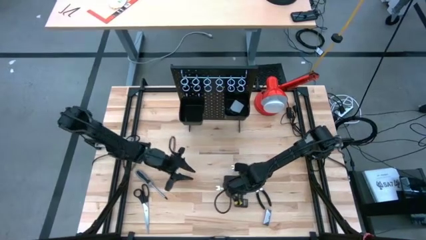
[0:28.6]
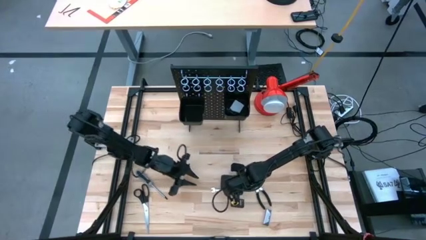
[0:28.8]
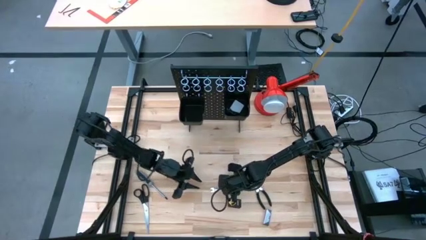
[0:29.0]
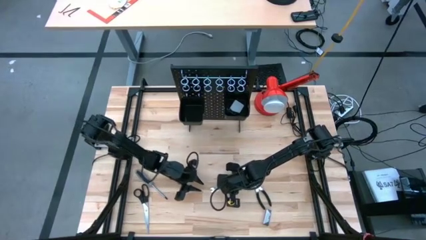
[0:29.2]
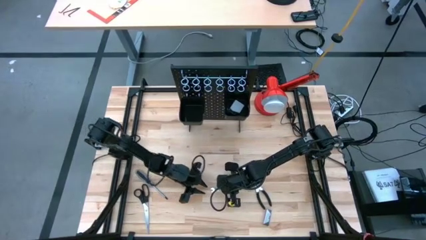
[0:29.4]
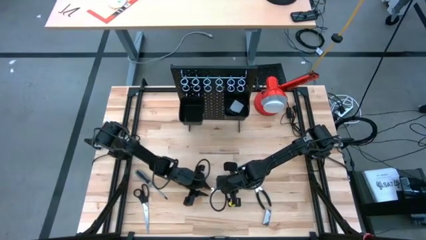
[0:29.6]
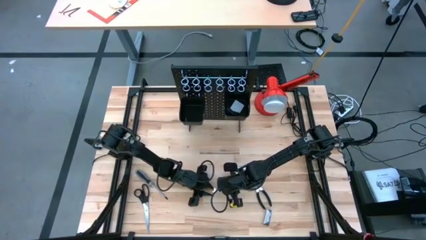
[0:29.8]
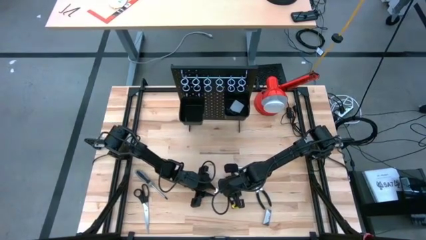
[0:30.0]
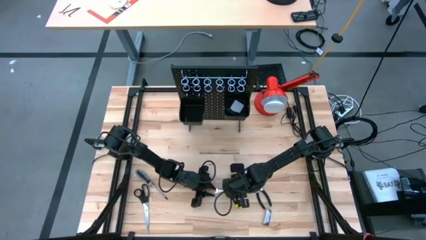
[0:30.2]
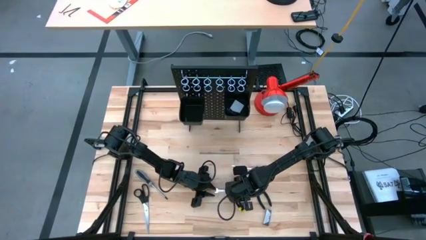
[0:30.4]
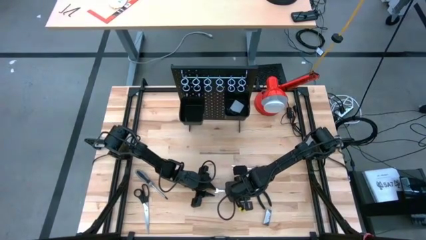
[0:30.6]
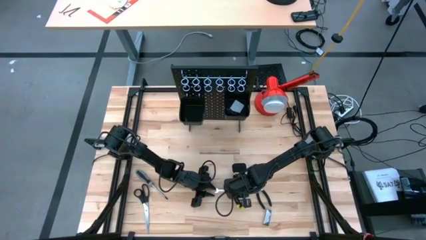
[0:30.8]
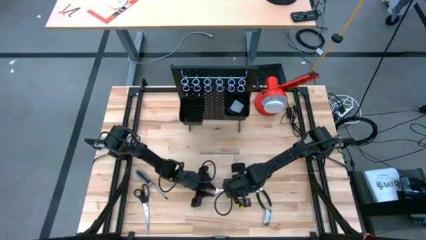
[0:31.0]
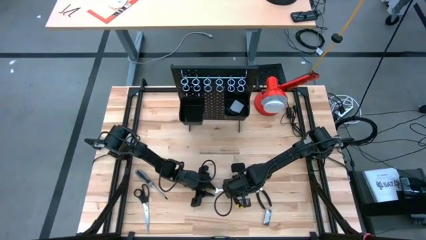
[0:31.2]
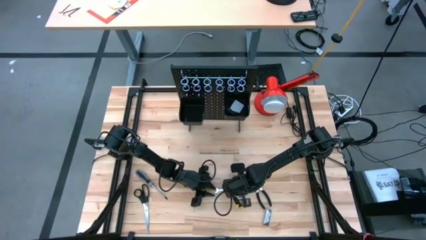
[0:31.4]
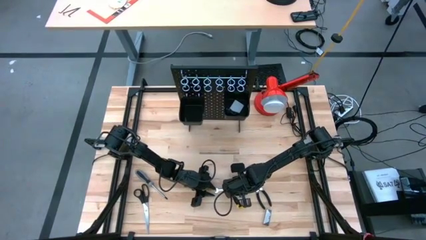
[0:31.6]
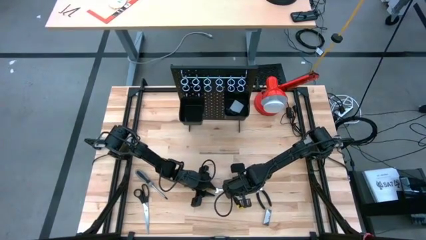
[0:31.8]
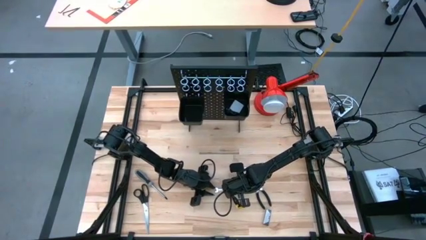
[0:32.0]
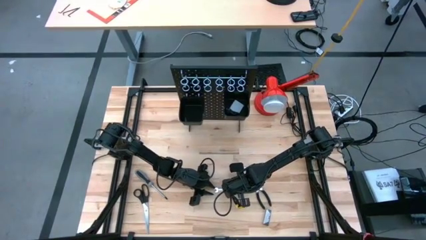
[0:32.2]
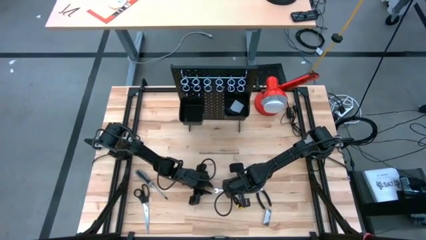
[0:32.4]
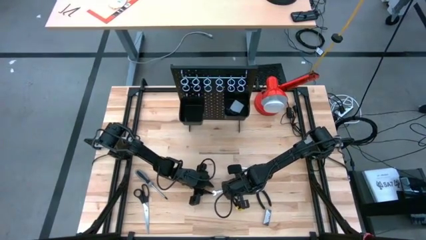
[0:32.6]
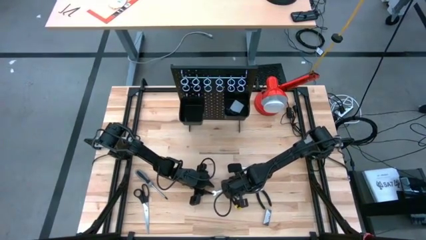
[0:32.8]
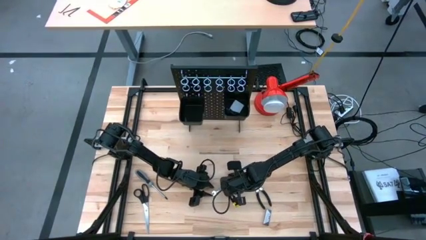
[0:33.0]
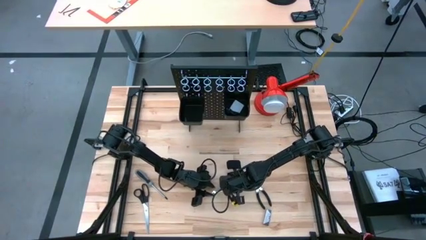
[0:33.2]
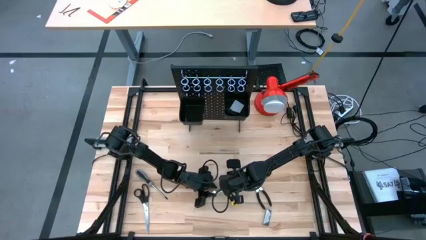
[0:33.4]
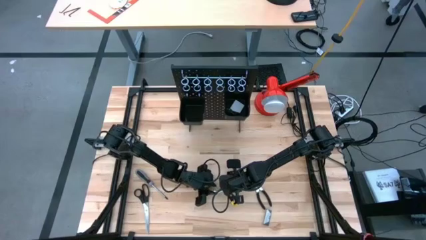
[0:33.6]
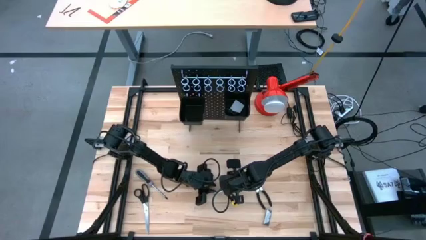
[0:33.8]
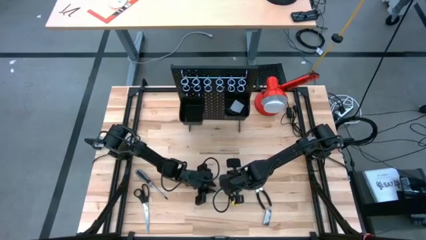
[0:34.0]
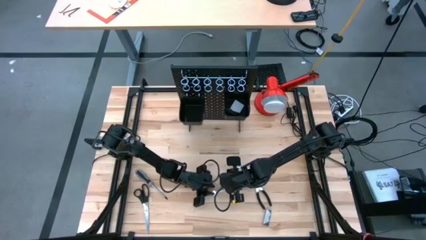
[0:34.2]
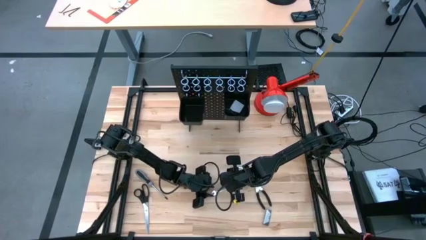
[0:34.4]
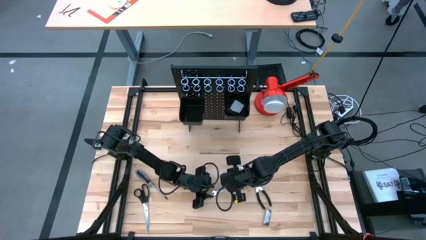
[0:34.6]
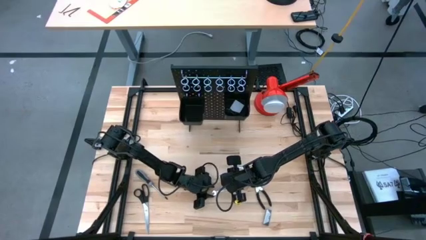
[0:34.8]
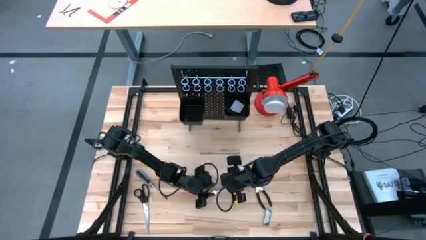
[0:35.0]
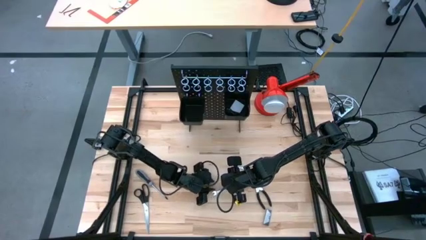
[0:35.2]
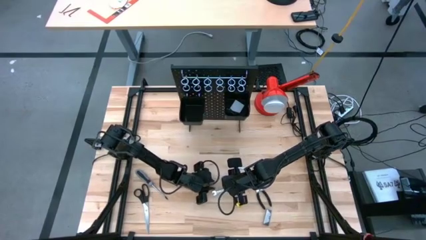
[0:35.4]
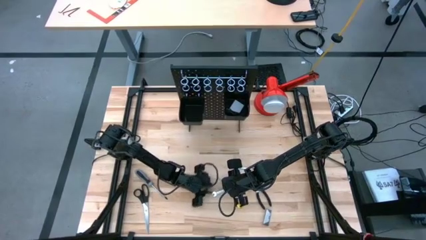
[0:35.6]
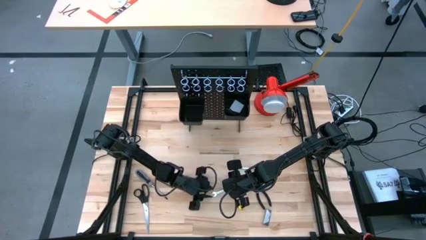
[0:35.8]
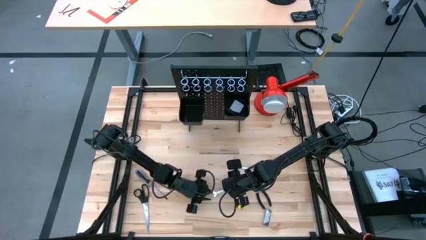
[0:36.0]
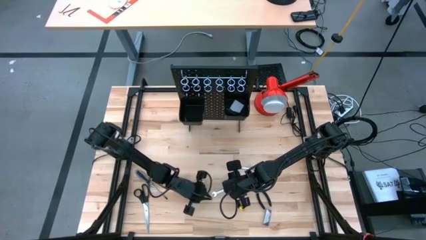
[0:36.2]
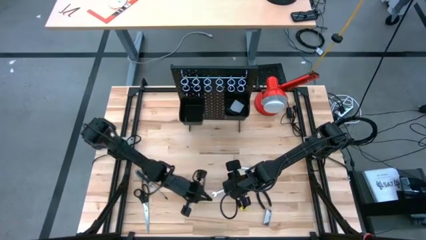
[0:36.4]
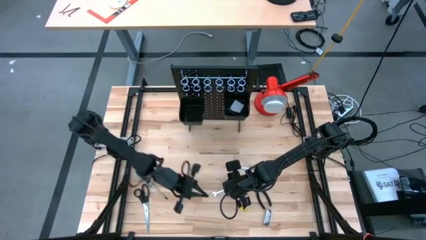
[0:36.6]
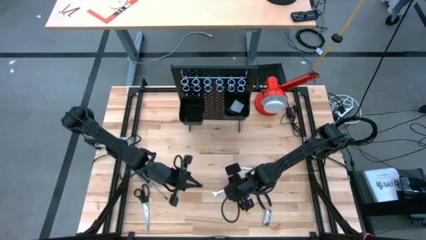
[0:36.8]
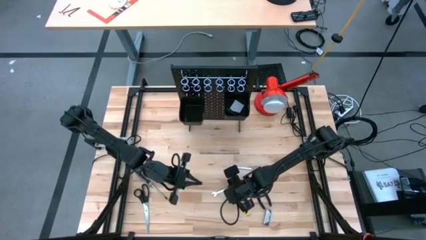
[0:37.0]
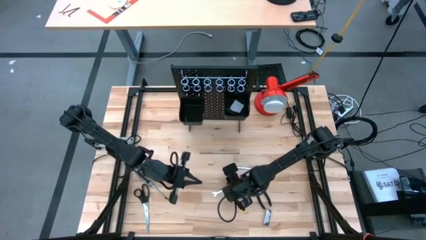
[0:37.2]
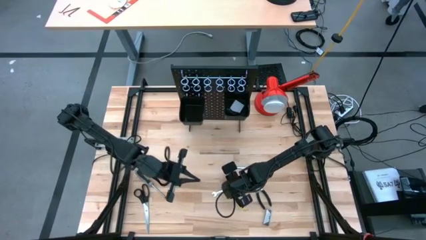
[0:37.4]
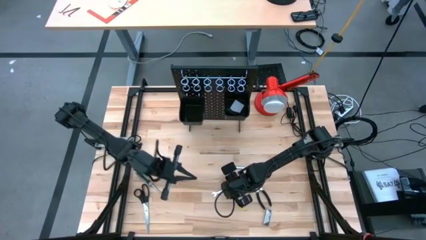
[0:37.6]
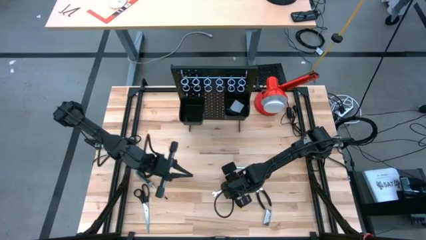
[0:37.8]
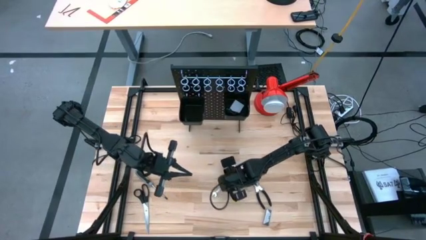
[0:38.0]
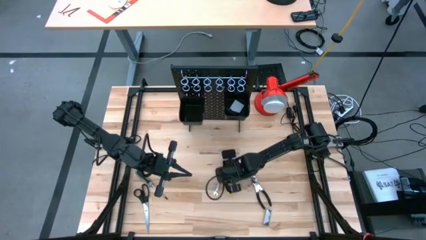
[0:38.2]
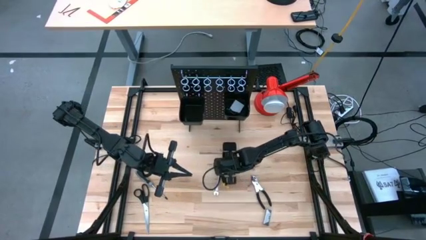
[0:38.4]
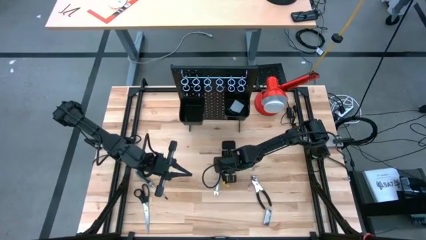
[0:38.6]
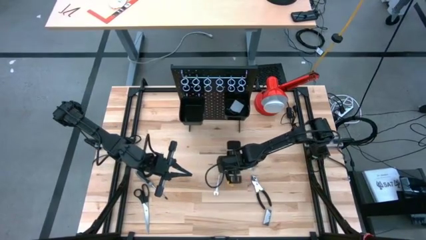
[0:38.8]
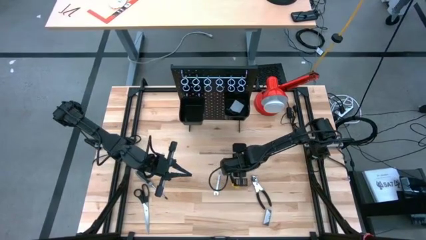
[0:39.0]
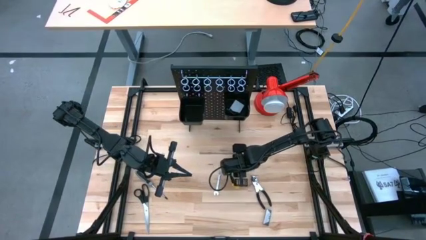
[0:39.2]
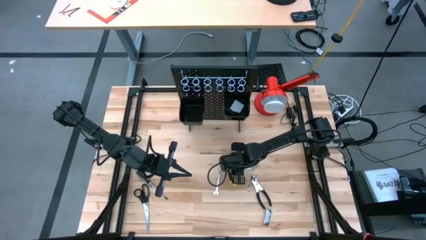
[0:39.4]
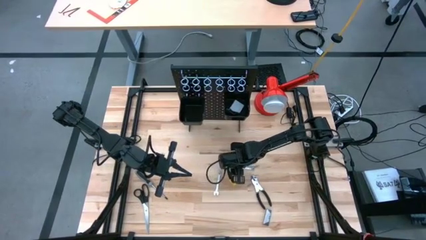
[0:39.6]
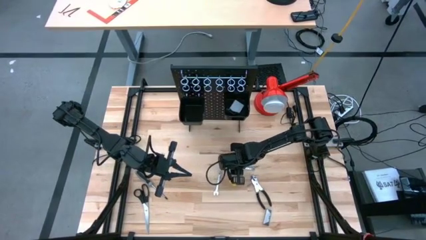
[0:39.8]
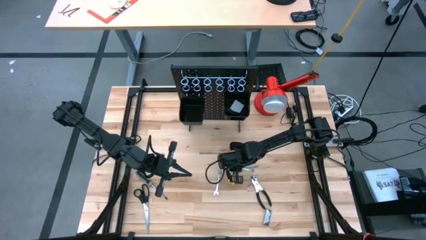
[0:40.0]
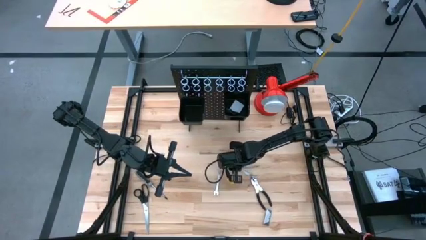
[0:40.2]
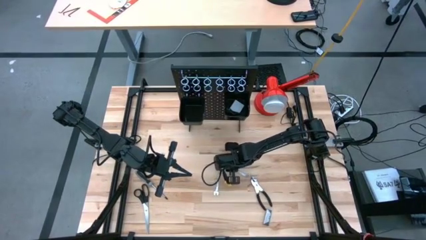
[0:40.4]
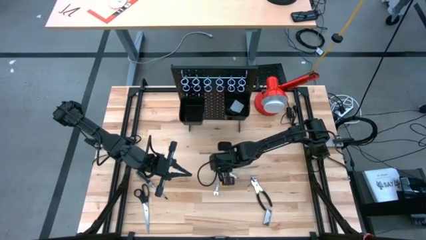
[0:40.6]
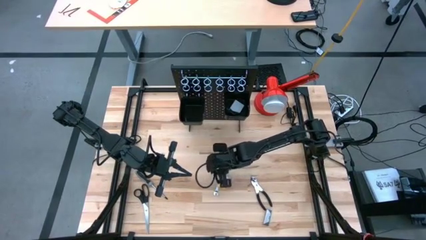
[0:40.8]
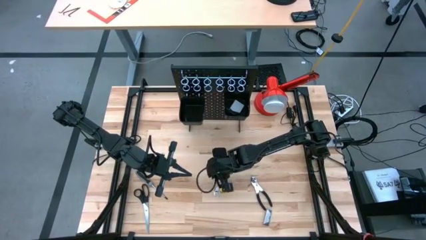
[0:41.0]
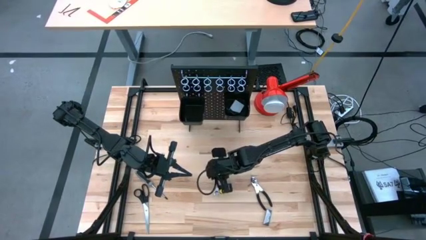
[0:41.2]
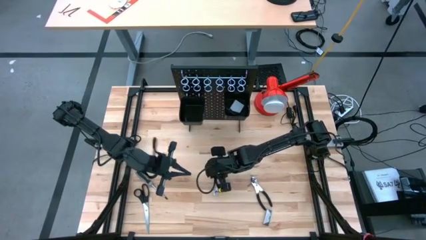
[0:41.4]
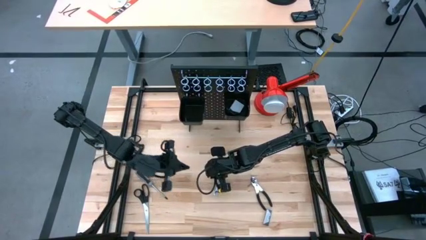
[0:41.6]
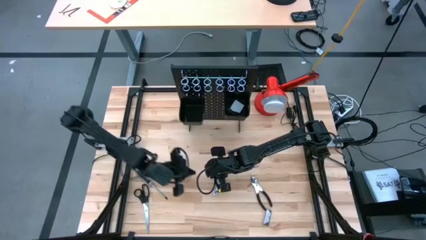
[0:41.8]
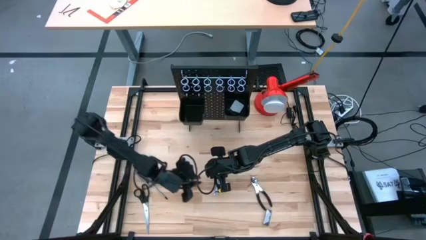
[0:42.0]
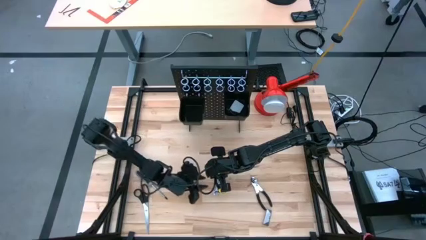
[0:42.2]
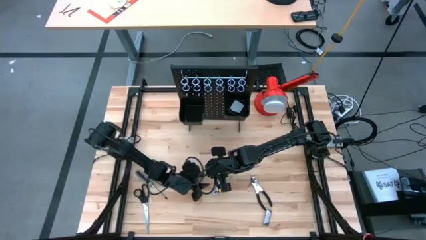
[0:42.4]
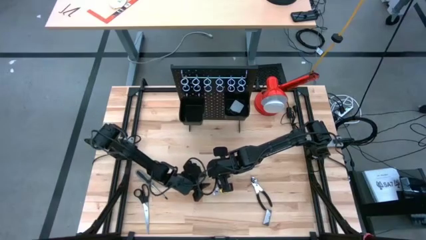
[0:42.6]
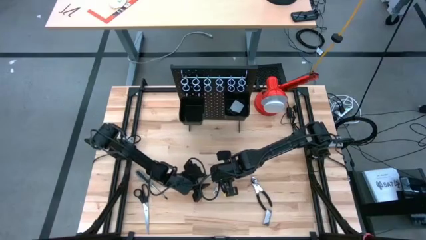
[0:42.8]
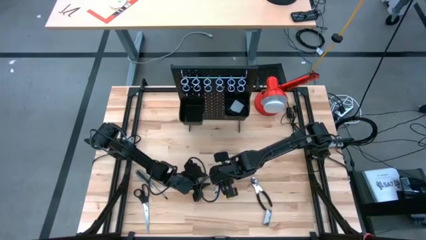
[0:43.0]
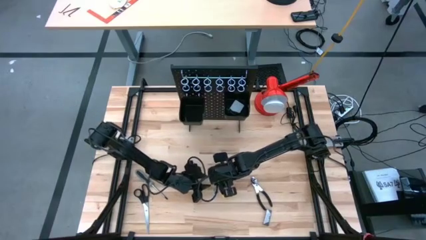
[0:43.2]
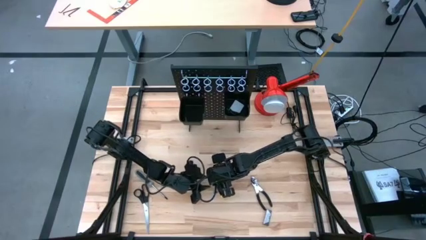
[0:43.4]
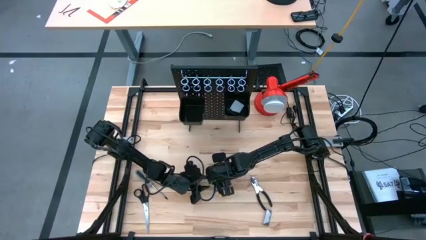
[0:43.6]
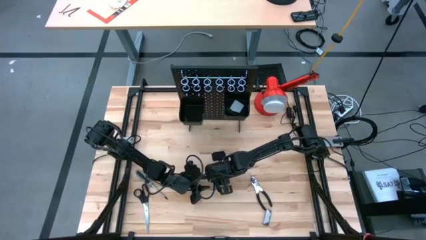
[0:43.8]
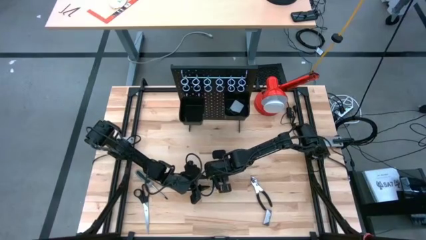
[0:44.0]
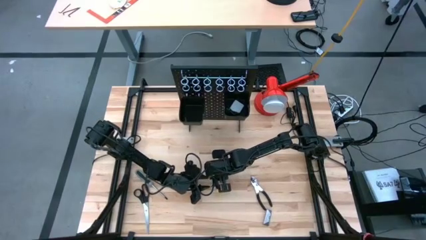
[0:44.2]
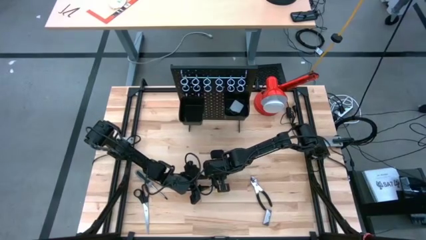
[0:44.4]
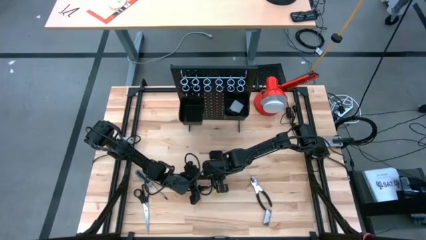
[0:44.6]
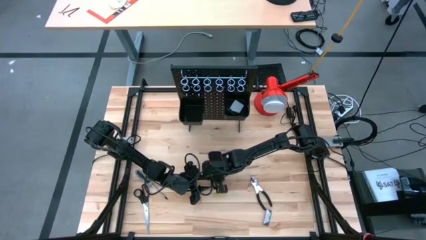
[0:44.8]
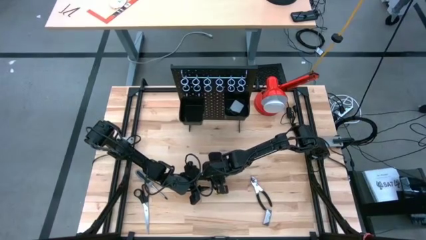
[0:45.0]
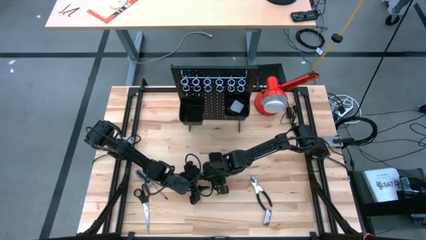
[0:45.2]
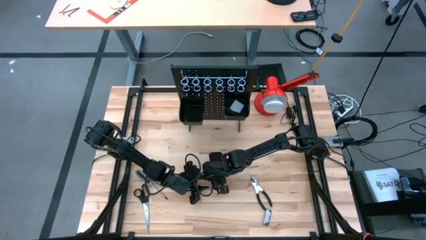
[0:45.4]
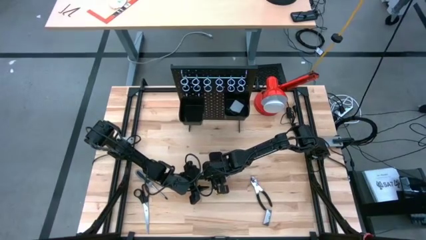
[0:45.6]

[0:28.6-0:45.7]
Task: Hang tools onto peg board
Hang the bottom wrench on the pegboard
